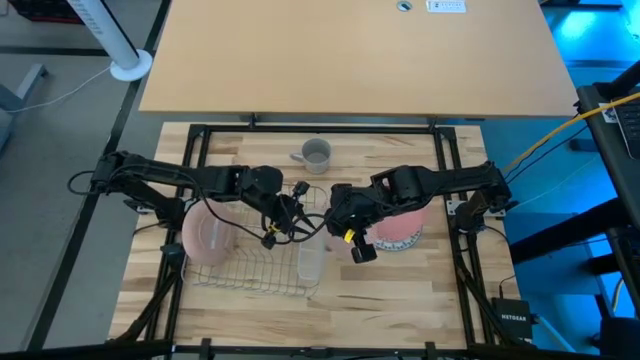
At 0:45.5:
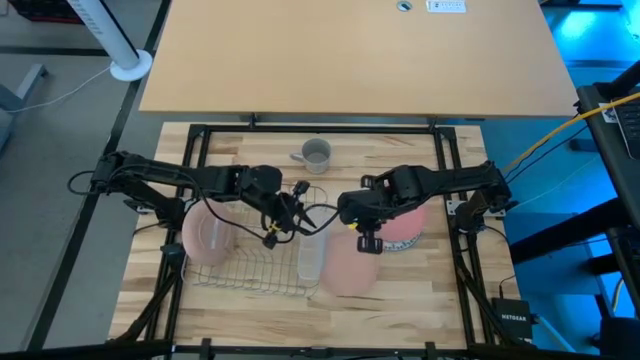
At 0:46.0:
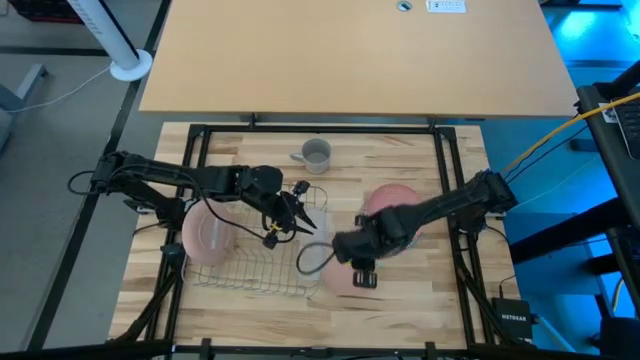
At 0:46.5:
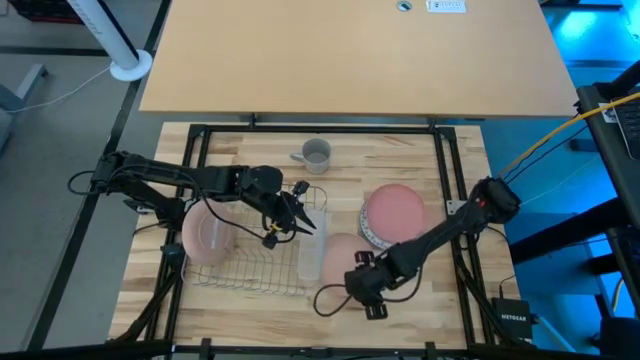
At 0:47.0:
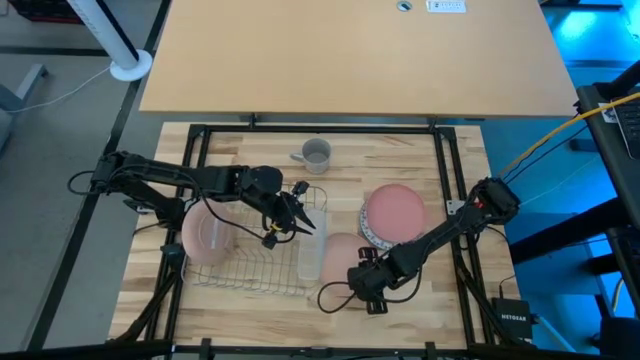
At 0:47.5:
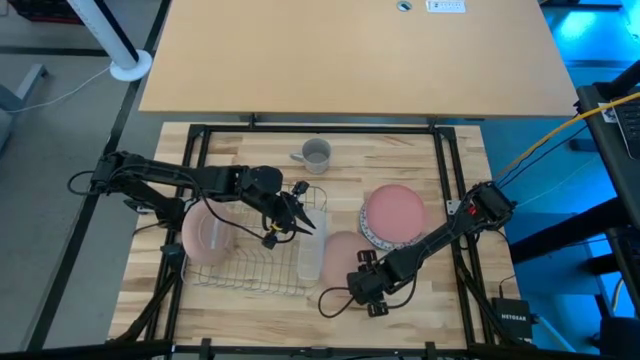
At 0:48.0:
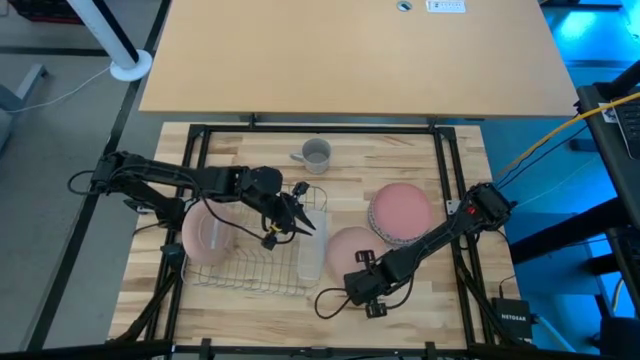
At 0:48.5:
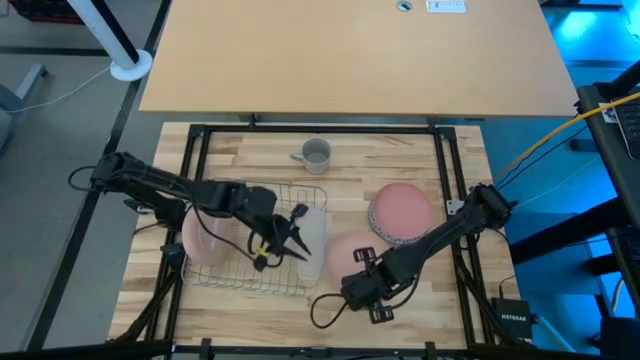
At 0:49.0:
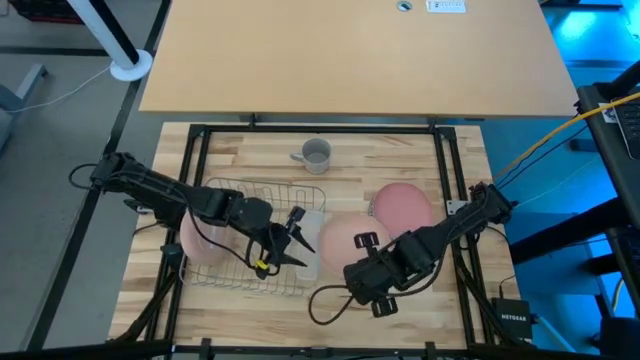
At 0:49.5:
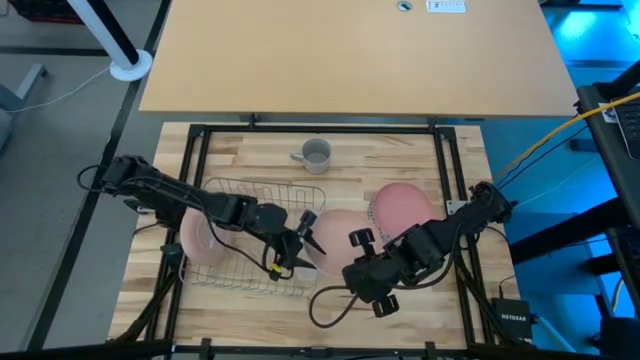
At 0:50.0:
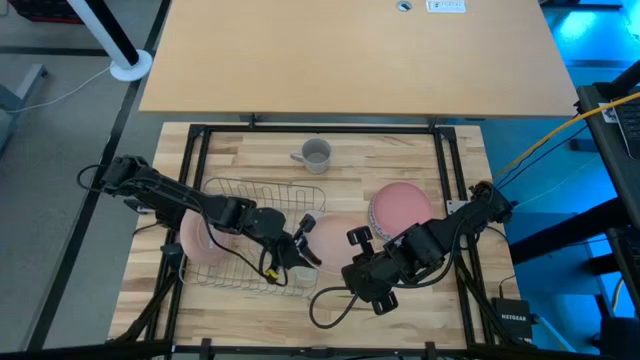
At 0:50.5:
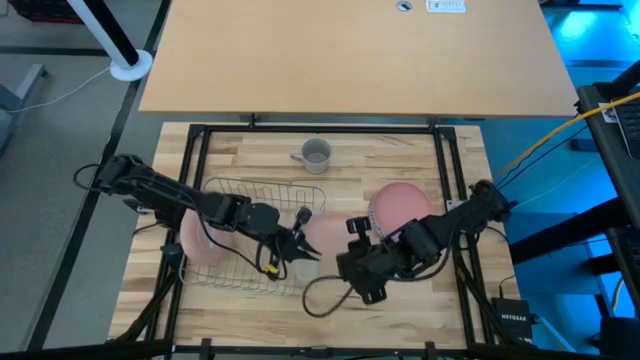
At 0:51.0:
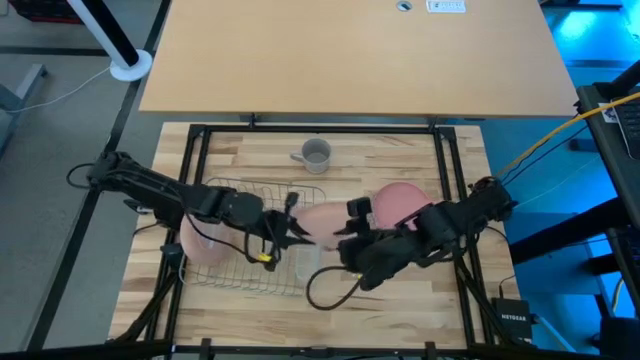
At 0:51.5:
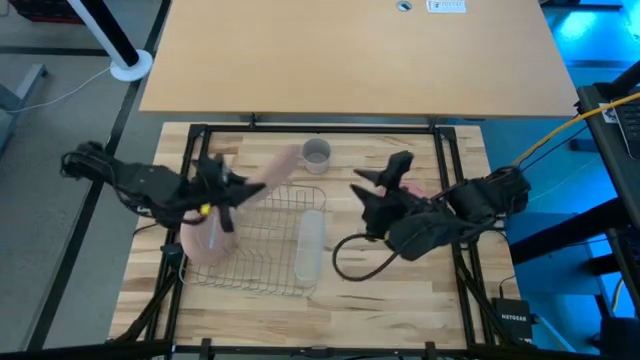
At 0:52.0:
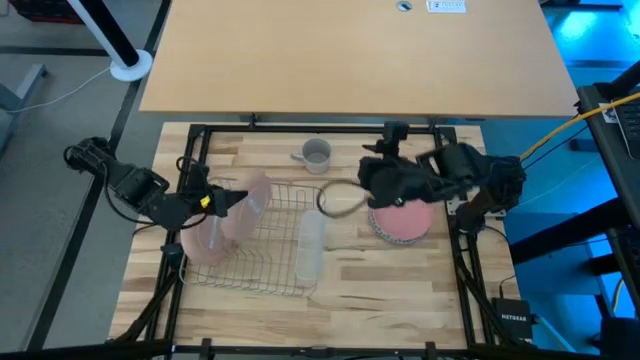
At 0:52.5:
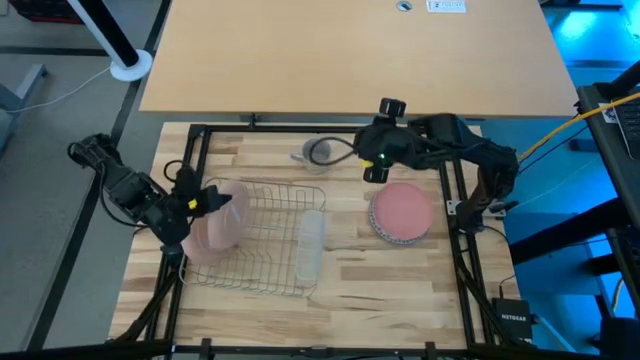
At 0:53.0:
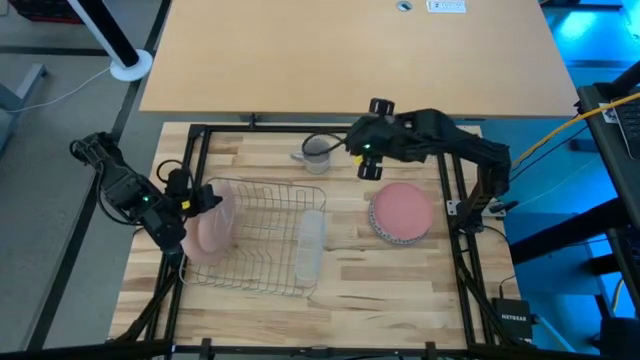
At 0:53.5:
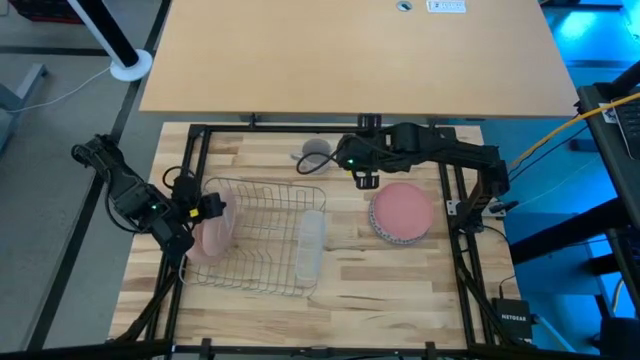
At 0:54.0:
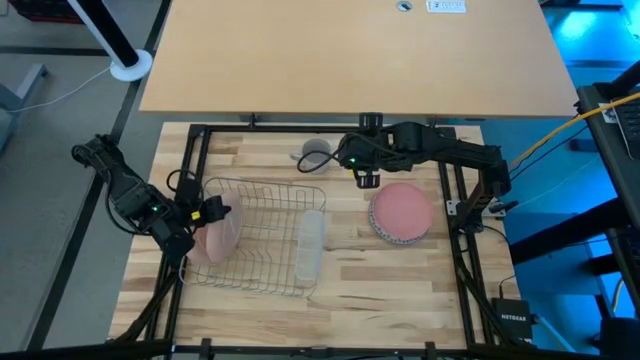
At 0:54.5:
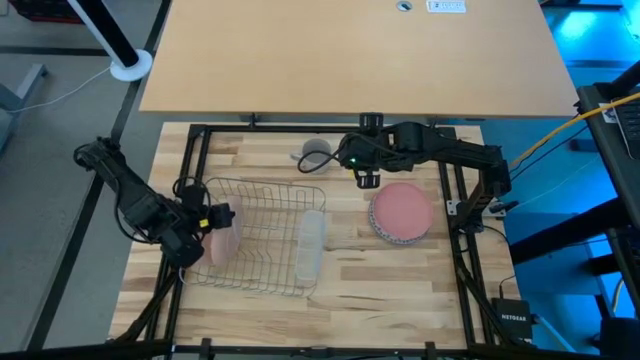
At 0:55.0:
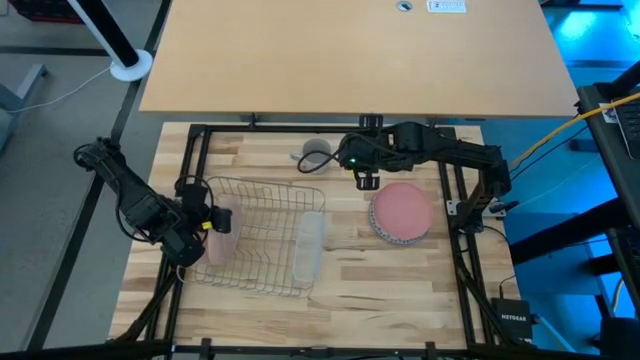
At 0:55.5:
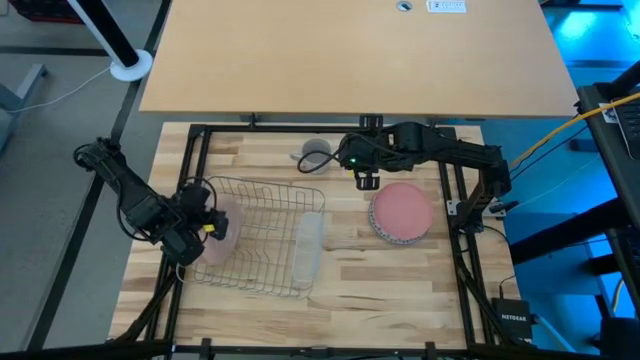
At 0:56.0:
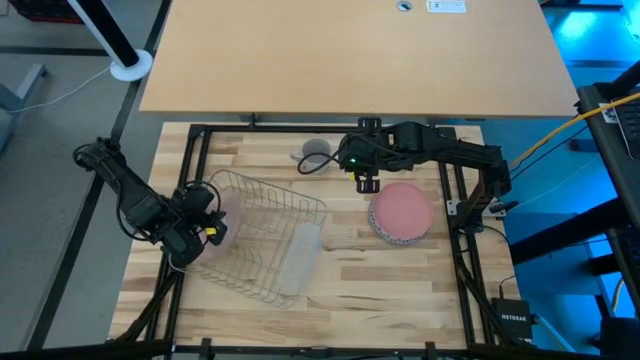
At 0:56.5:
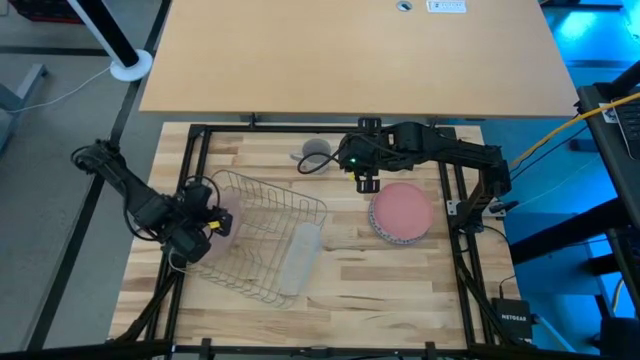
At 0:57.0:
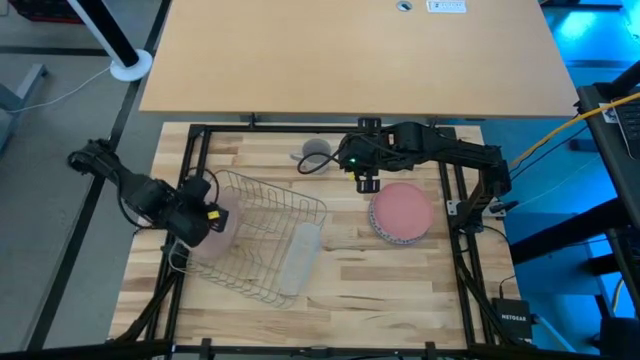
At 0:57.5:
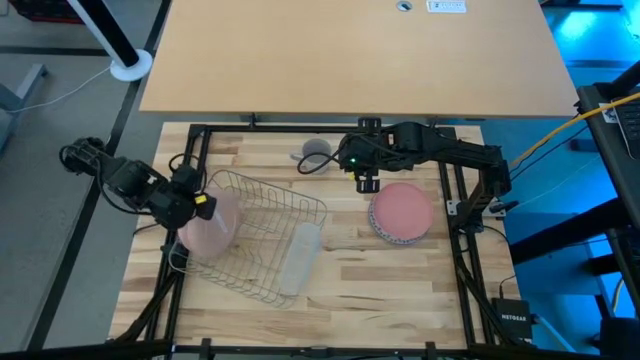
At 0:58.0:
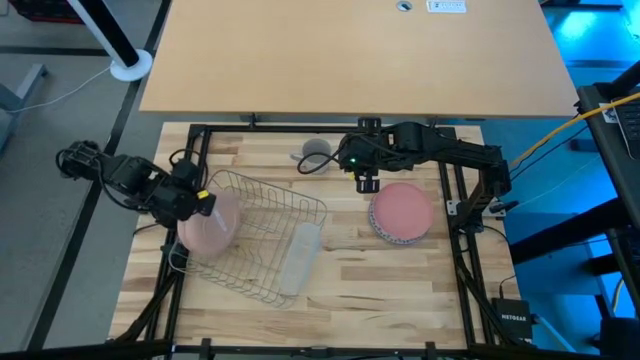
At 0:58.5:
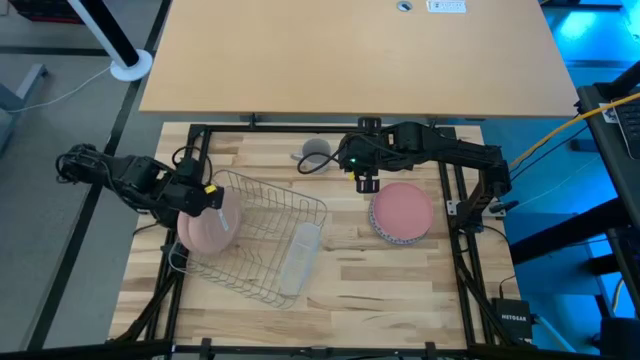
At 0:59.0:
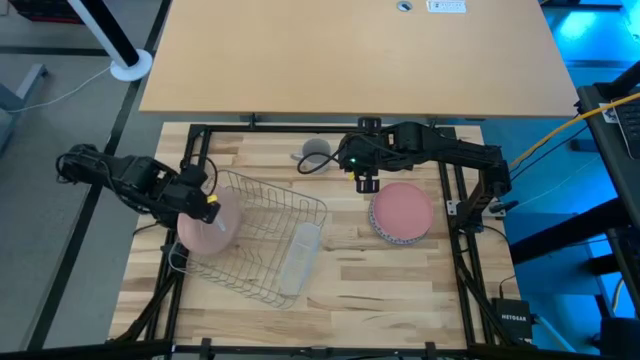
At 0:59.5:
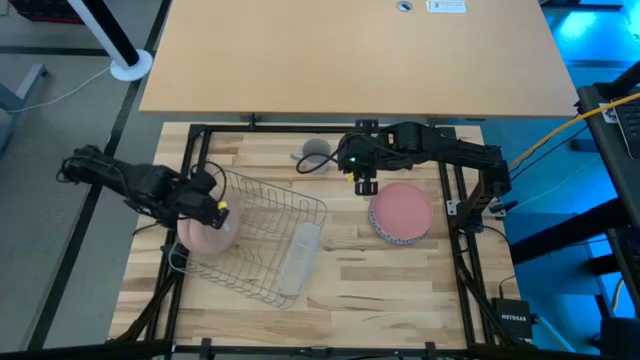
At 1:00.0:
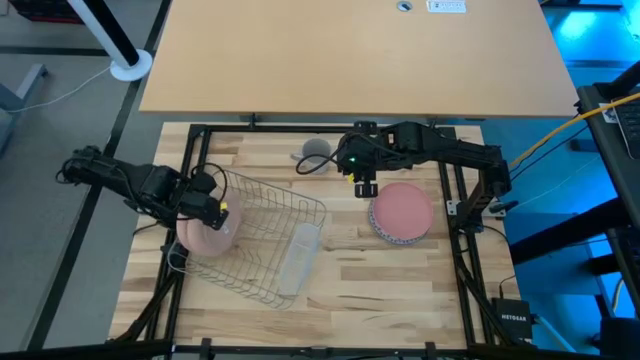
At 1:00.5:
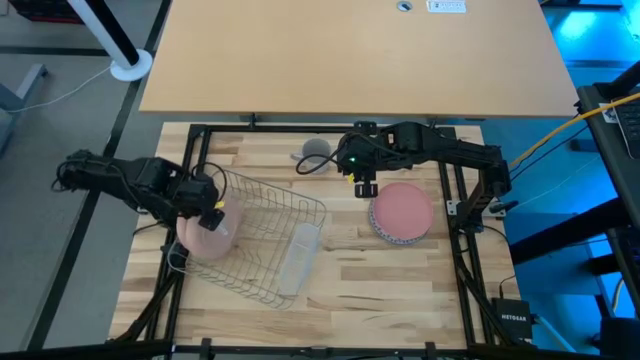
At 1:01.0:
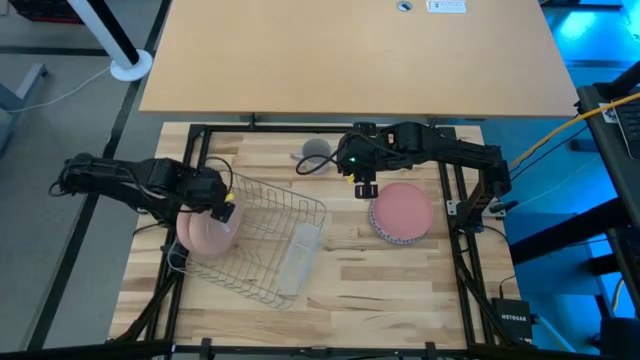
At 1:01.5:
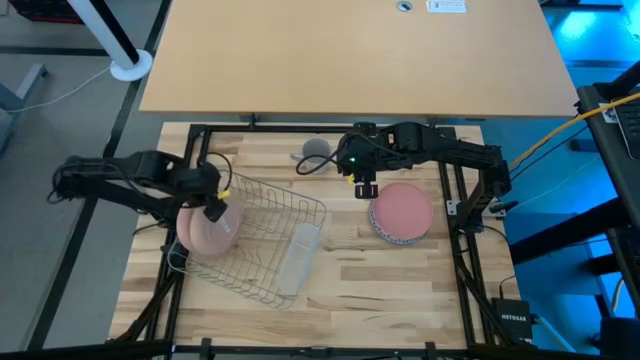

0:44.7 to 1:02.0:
Task: Sort dishes
Put the pink plate in the dish rack
